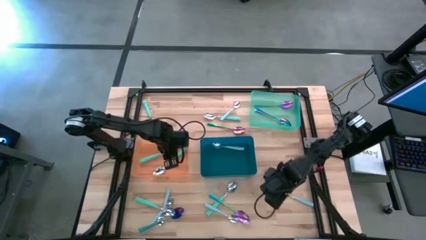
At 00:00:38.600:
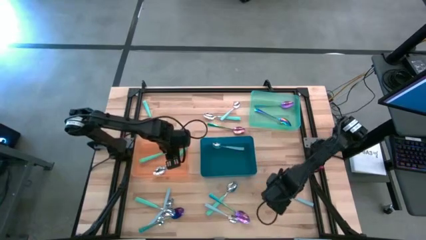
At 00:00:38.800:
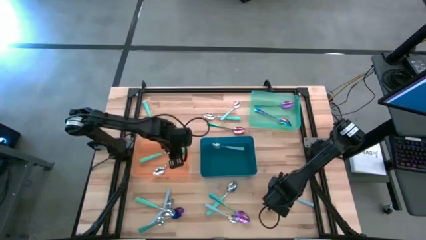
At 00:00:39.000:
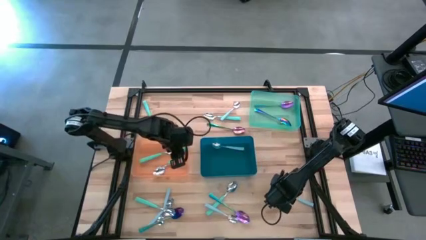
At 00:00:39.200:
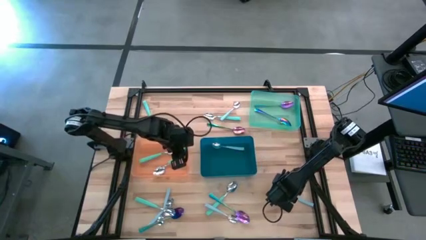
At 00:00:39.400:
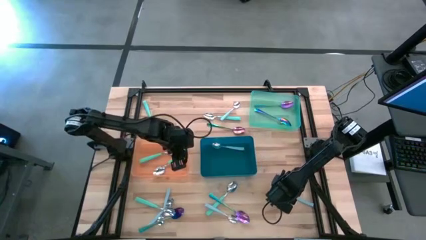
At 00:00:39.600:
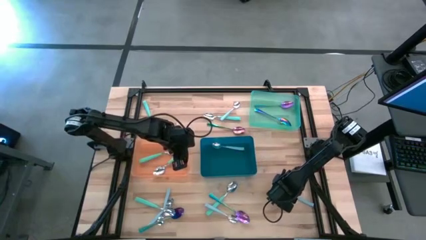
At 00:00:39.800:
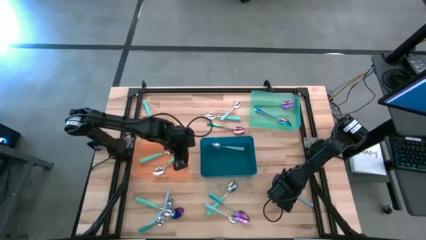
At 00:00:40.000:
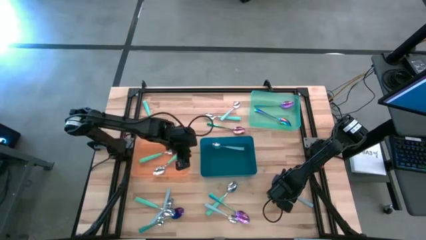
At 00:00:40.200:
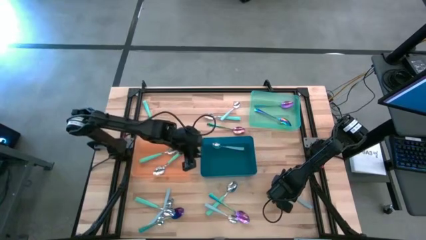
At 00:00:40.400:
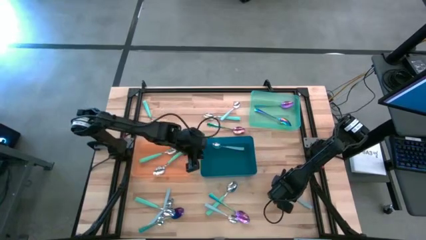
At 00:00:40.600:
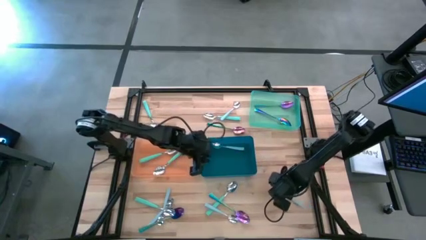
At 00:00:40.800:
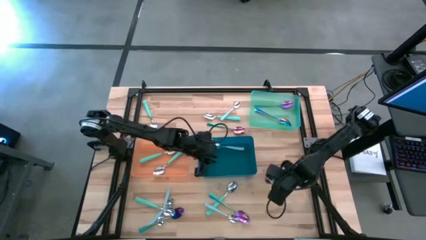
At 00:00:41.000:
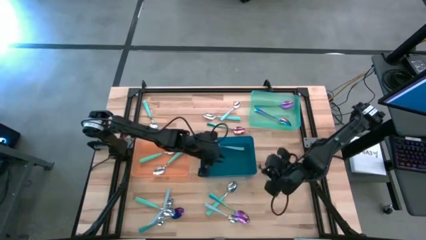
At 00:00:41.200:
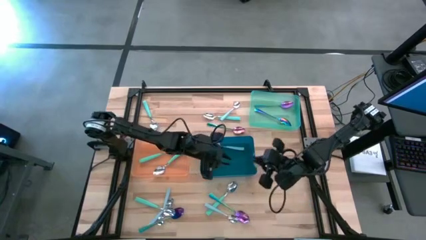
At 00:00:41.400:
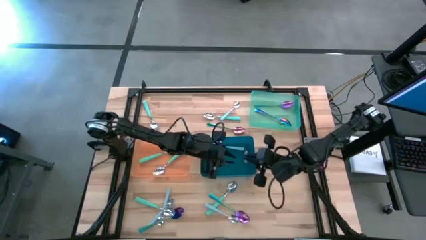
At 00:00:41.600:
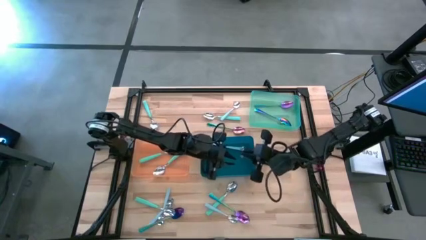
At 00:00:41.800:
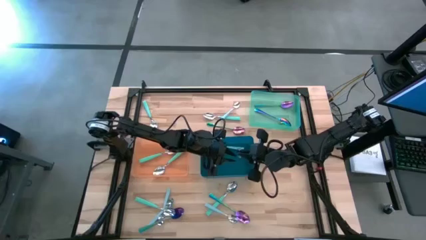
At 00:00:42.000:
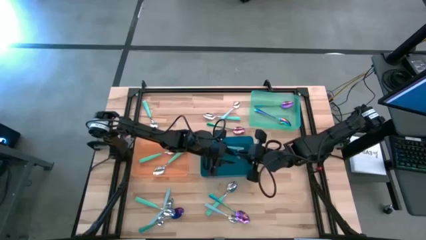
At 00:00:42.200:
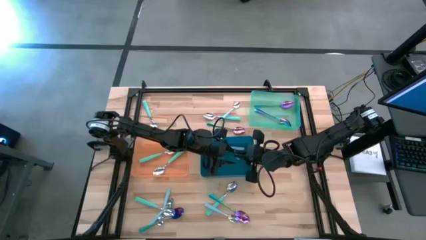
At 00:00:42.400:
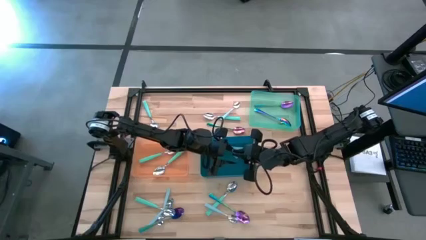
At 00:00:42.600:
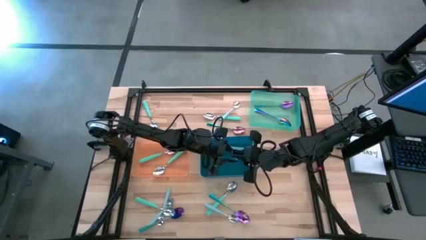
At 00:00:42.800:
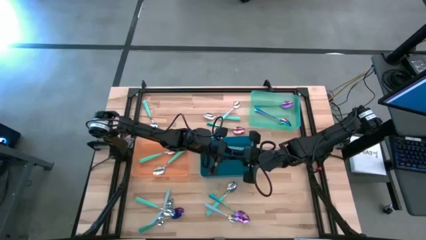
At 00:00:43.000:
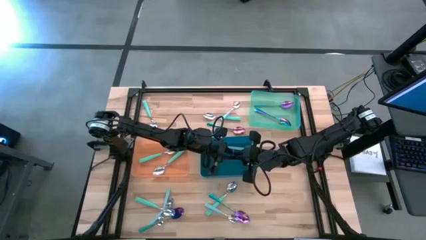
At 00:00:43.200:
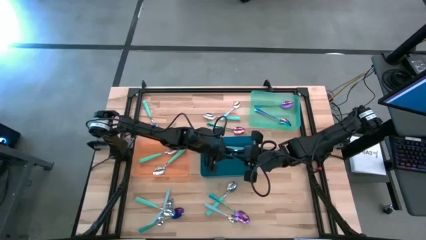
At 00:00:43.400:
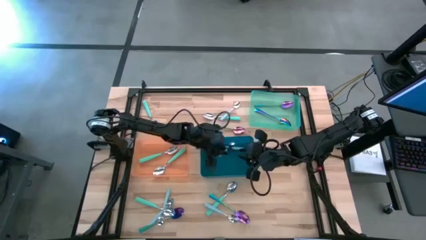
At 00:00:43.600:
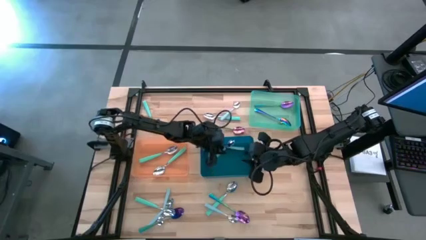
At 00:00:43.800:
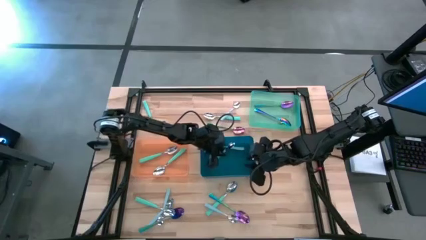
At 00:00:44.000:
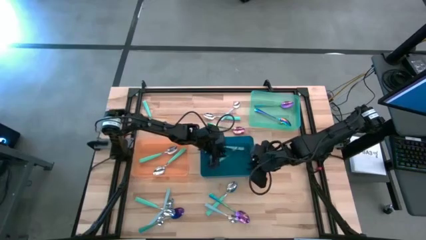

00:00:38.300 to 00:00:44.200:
Task: Sort silverware by color (type)
Put the light blue spoon into the blue bin

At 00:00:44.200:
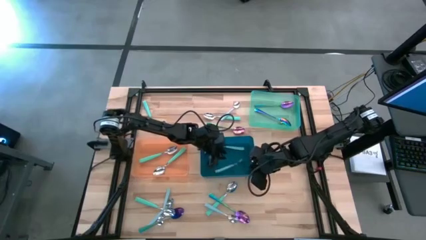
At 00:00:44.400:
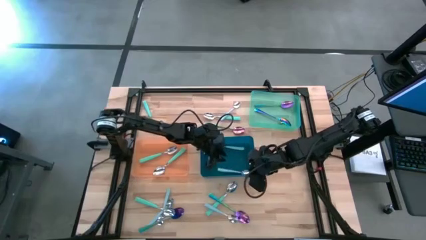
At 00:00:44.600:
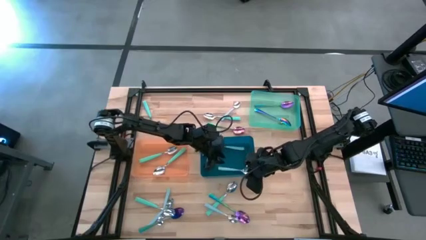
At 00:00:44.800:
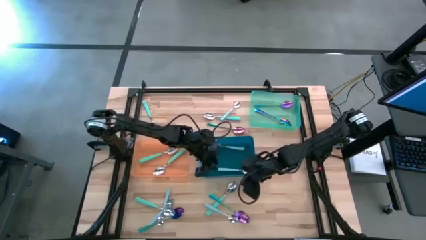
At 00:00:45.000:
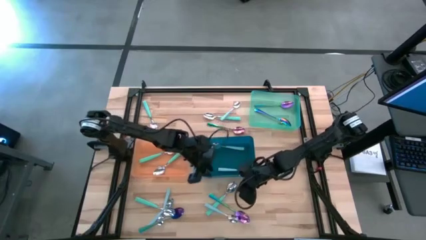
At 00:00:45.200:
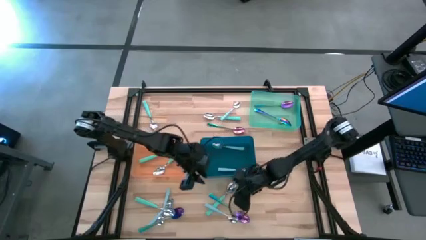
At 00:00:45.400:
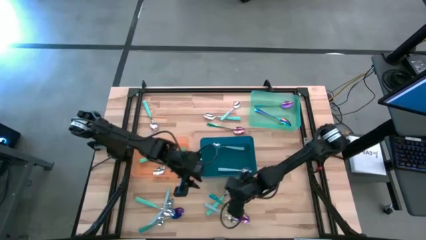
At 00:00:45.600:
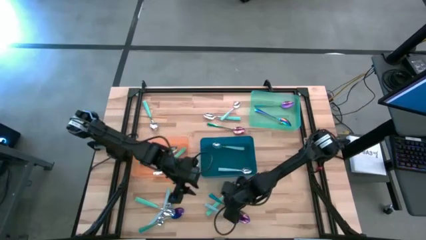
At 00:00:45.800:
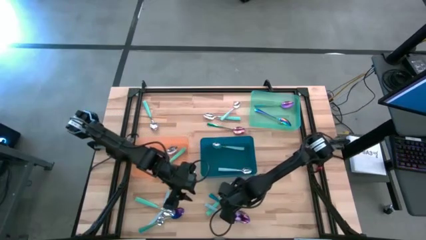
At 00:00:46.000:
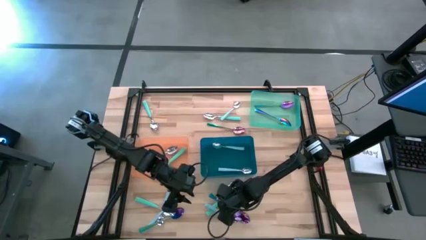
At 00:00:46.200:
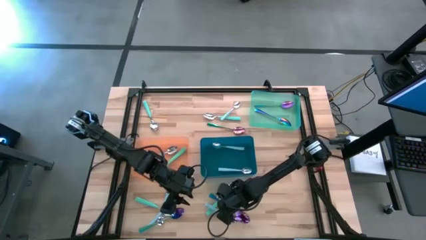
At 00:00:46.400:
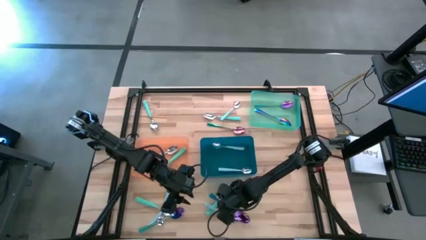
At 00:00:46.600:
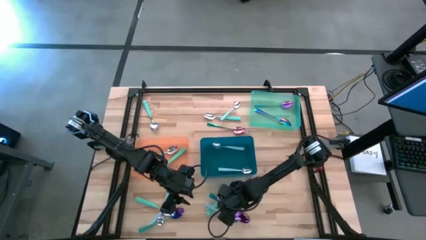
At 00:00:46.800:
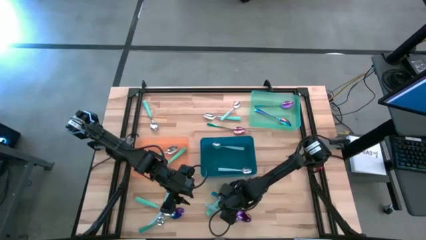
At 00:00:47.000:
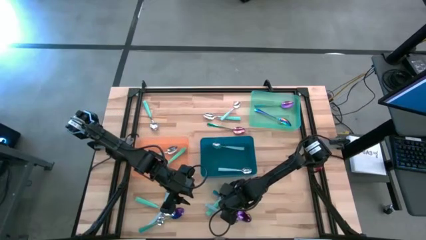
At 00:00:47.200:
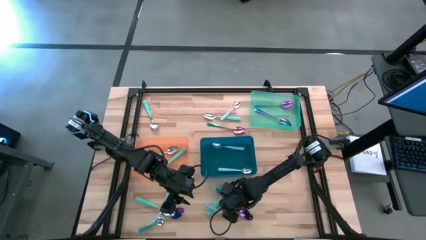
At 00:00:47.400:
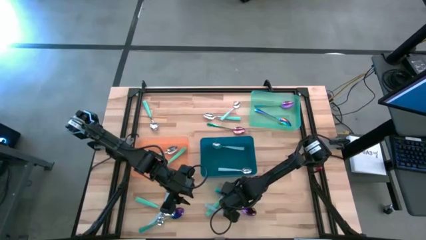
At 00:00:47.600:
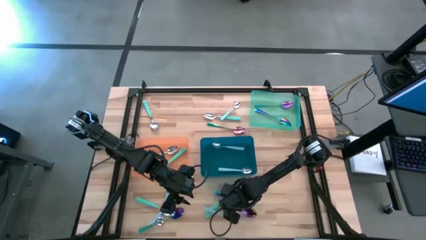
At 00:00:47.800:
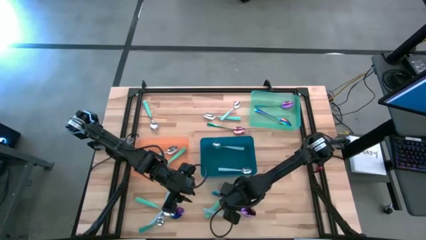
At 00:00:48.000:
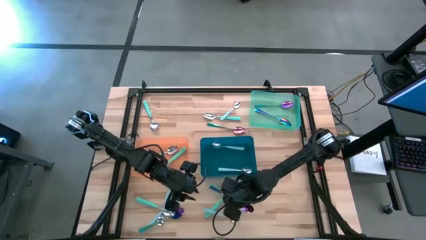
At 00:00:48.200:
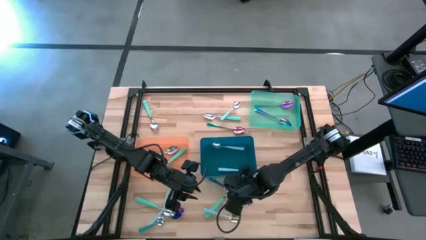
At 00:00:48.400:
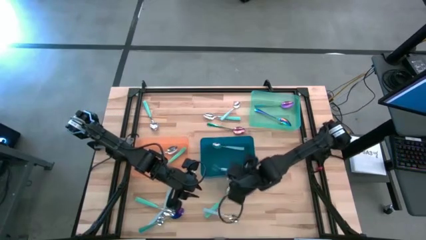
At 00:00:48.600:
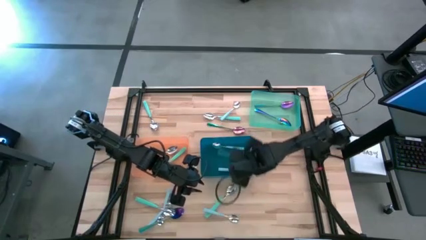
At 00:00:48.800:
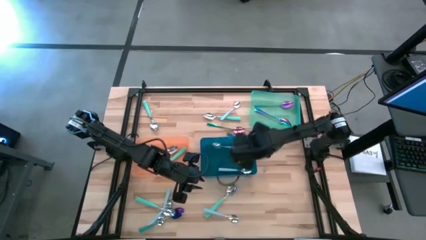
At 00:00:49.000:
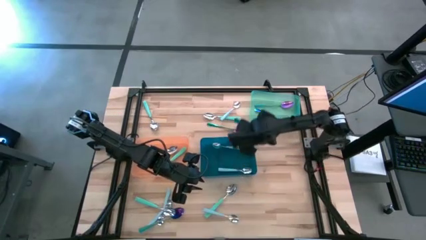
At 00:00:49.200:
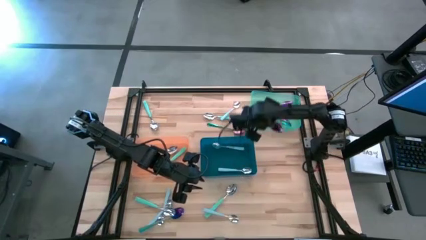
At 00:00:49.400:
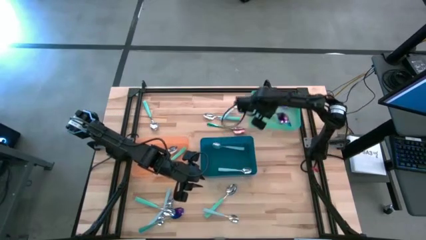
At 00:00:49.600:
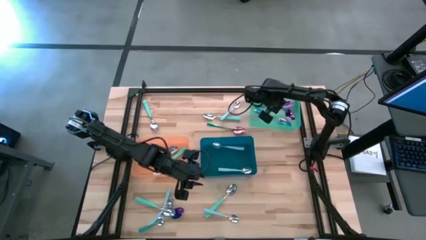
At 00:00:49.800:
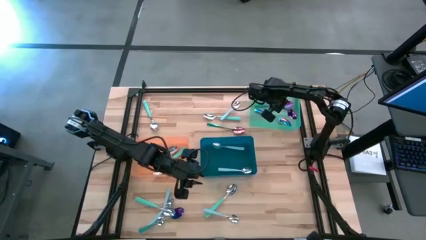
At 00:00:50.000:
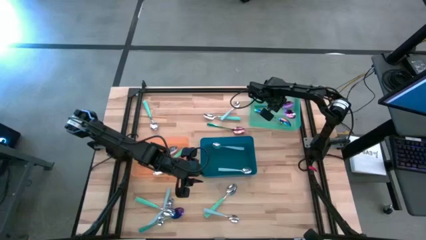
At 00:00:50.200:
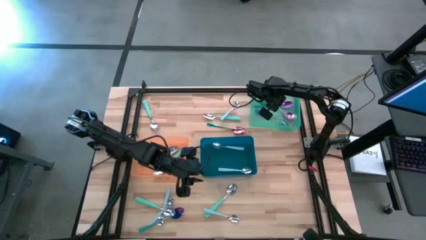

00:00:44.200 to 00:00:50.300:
Put the blue spoon into the green bin

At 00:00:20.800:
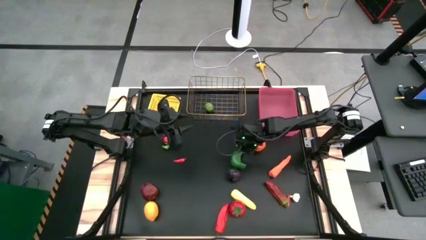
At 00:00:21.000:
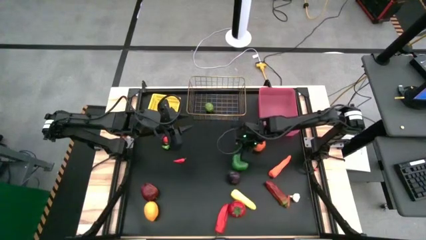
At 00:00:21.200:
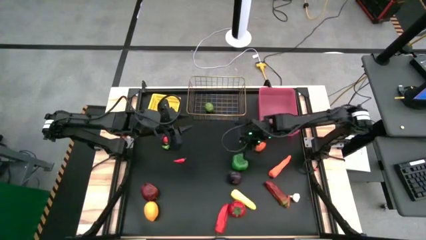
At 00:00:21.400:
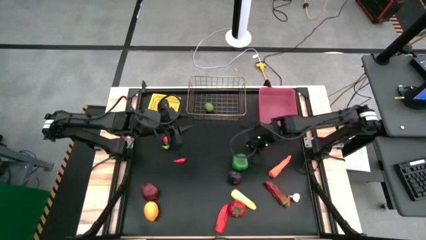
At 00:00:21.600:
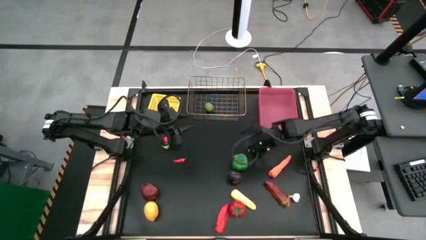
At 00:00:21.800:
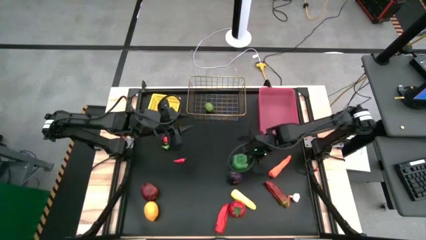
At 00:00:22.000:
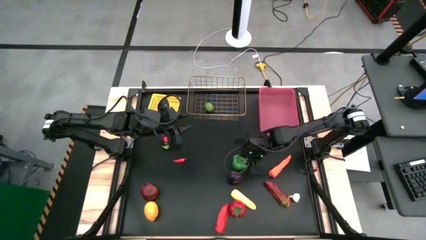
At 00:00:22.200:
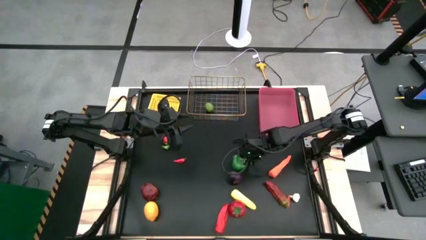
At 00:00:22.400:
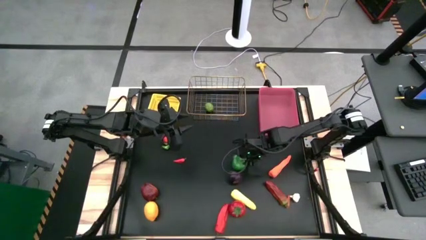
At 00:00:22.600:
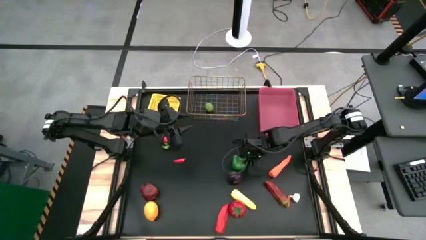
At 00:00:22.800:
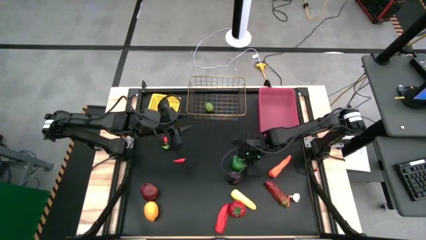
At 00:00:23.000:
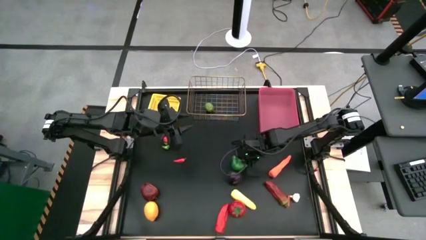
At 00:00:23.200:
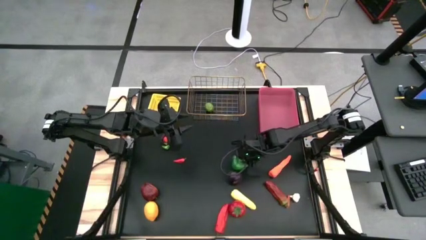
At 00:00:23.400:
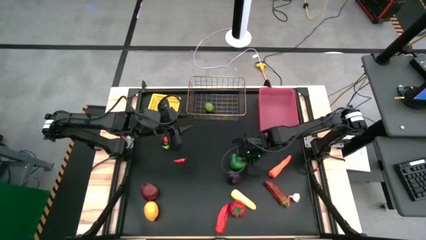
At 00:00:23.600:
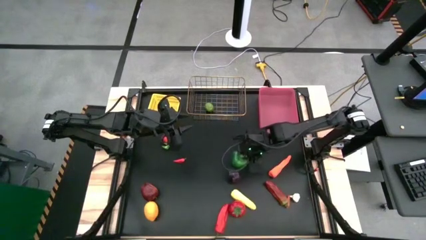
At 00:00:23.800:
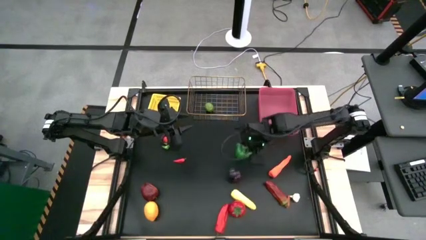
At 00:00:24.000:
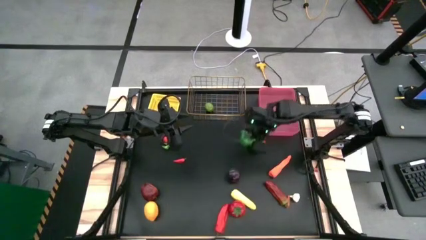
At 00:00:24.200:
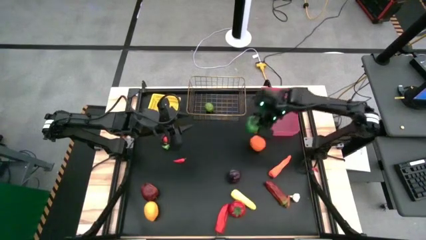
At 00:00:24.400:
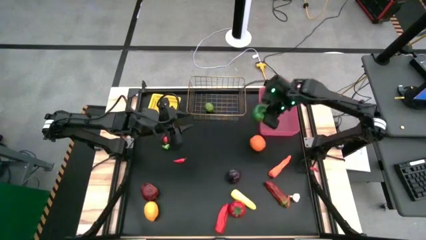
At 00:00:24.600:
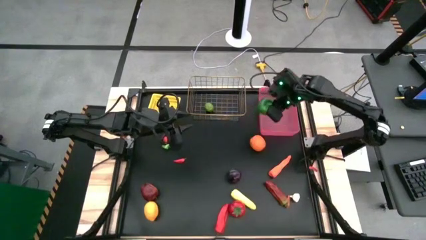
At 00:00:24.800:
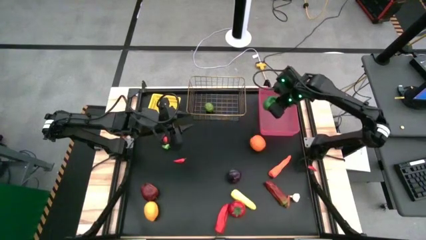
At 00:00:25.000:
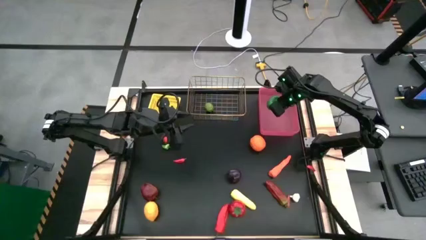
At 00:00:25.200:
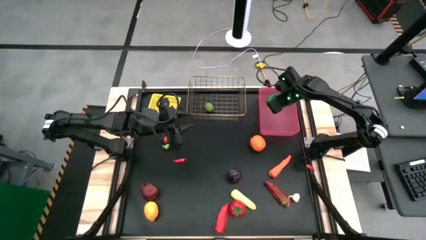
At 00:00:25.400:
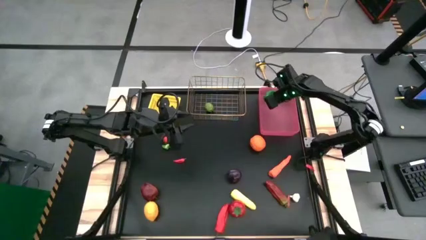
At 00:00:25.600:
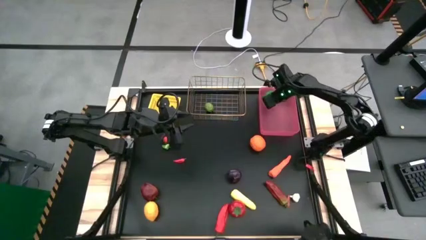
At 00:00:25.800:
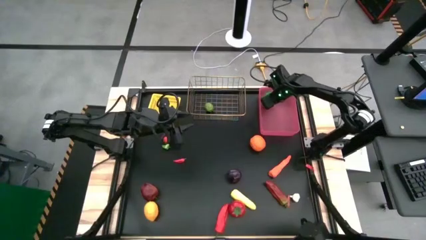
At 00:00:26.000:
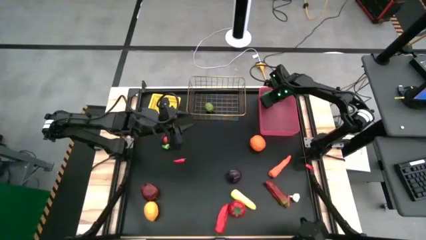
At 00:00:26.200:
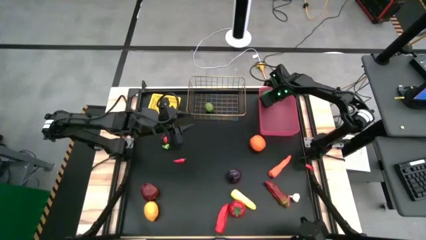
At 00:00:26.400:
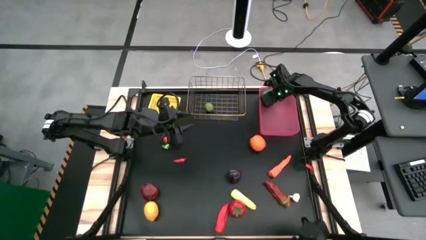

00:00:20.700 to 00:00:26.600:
Task: Sort produce into baskets
Put the large green bell pepper into the pink bin
